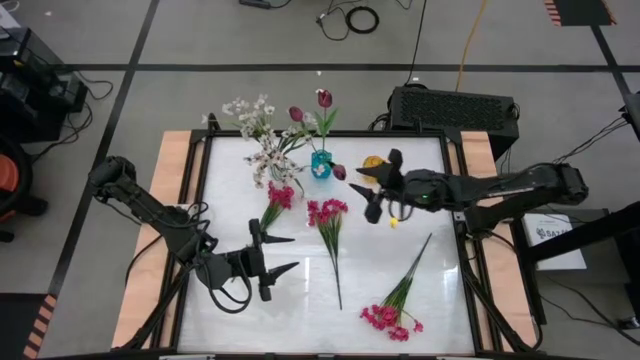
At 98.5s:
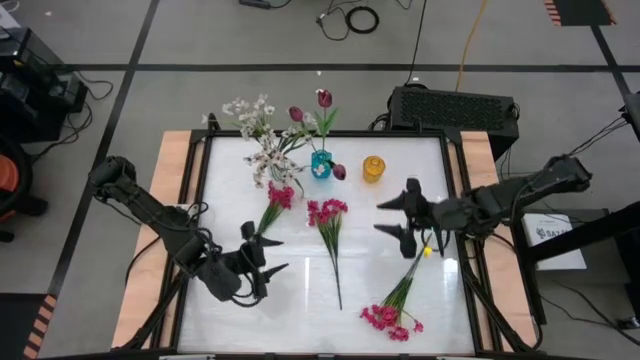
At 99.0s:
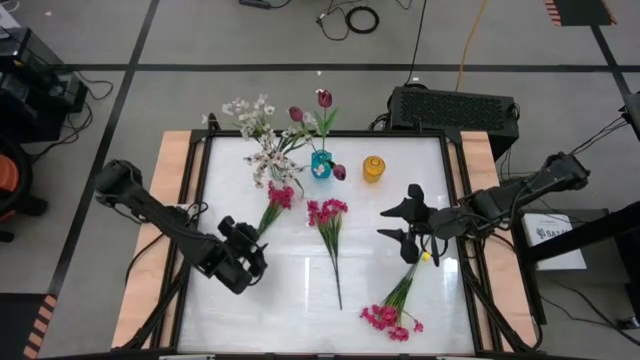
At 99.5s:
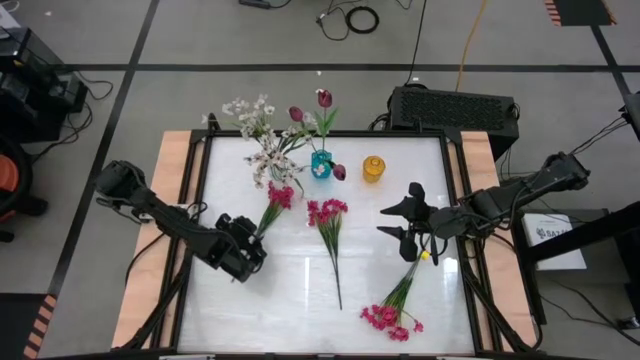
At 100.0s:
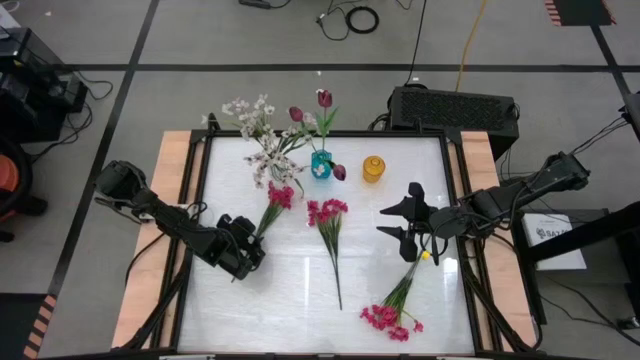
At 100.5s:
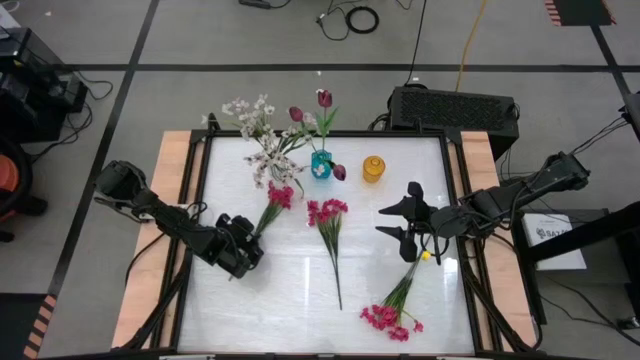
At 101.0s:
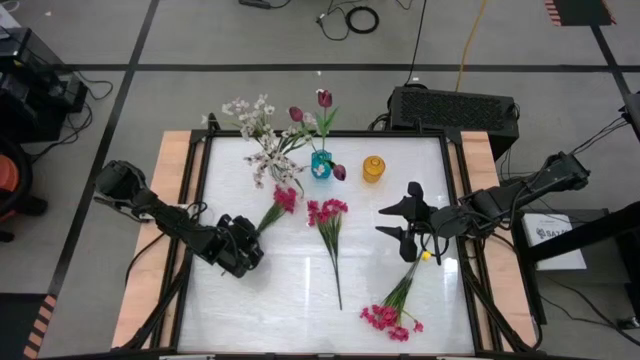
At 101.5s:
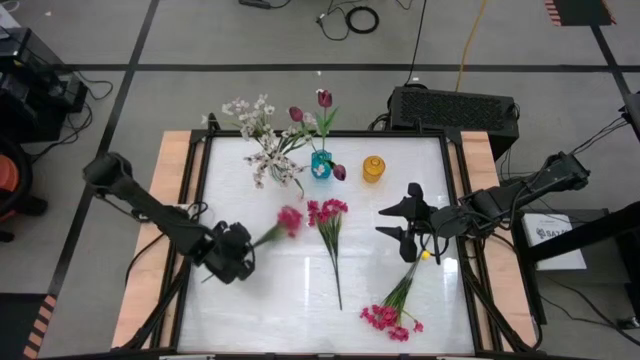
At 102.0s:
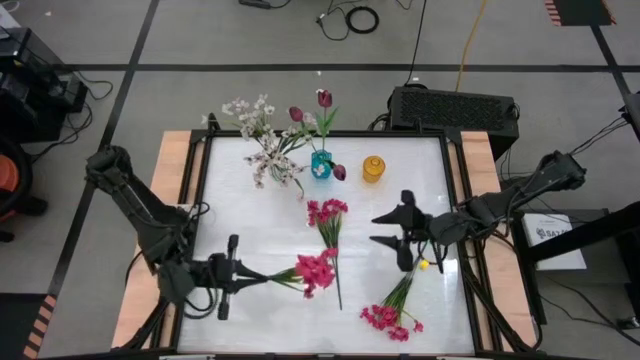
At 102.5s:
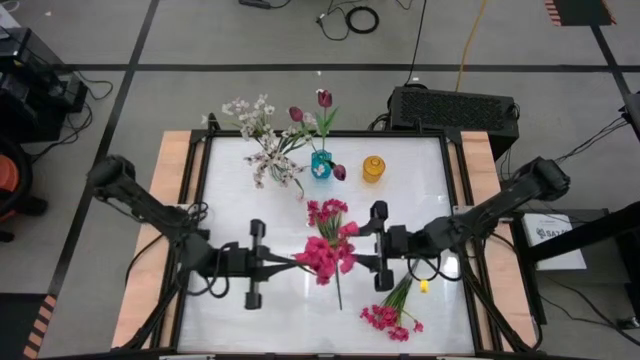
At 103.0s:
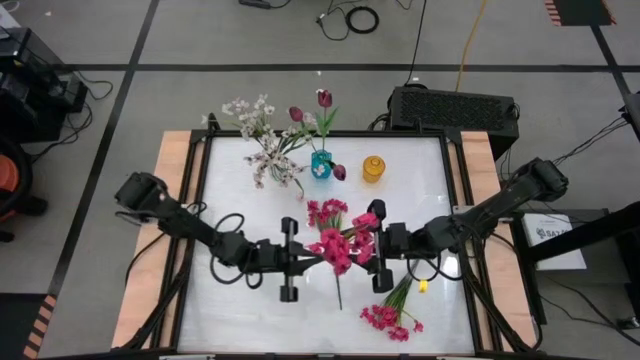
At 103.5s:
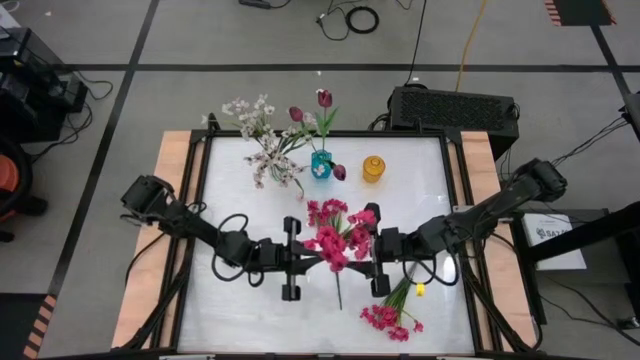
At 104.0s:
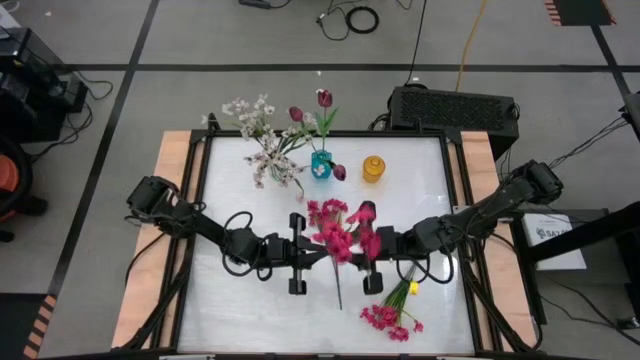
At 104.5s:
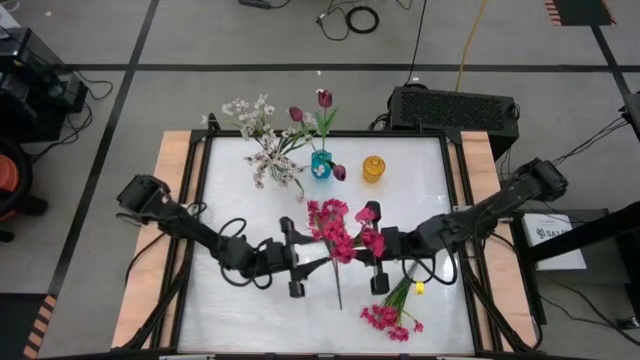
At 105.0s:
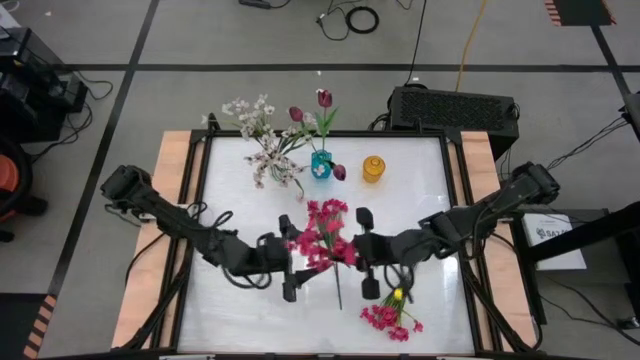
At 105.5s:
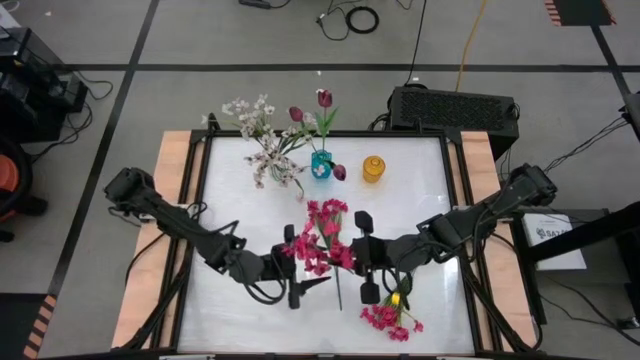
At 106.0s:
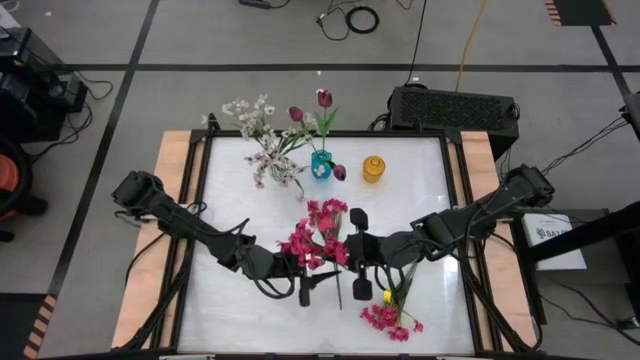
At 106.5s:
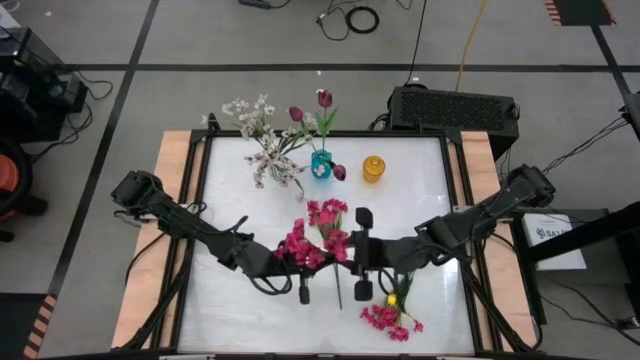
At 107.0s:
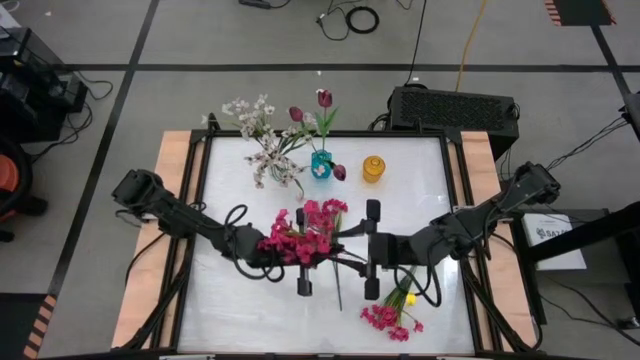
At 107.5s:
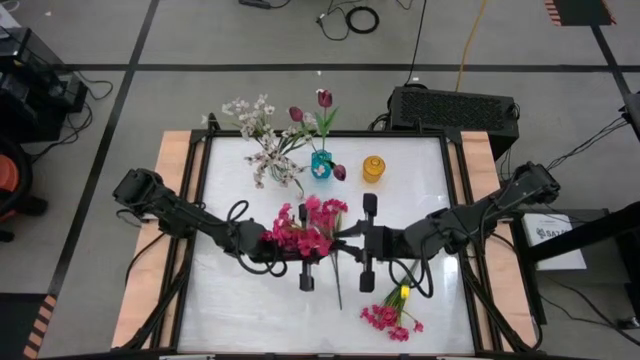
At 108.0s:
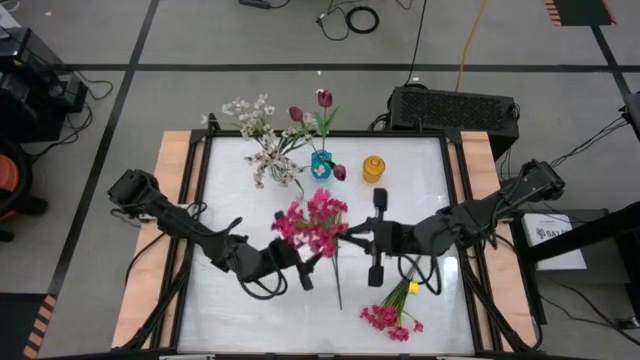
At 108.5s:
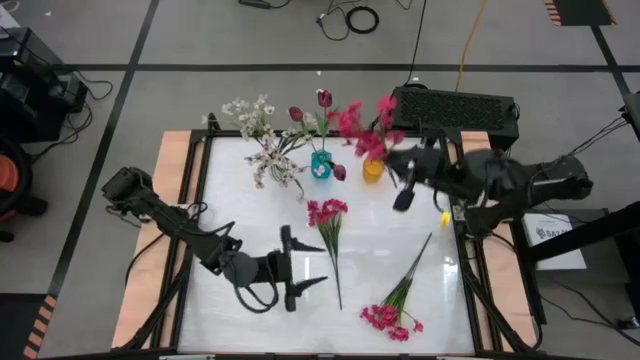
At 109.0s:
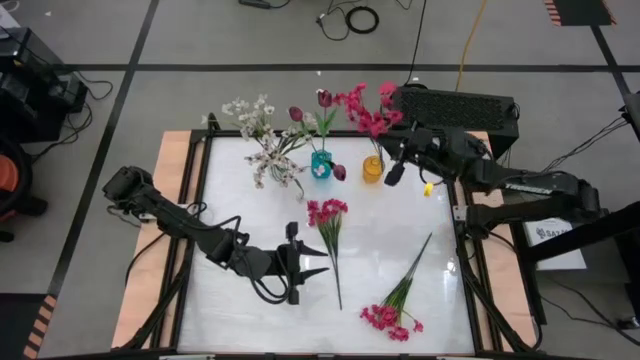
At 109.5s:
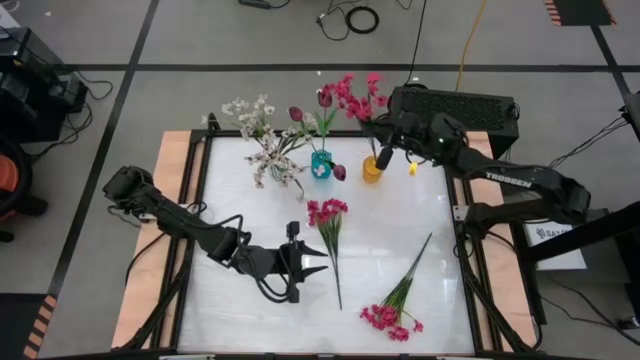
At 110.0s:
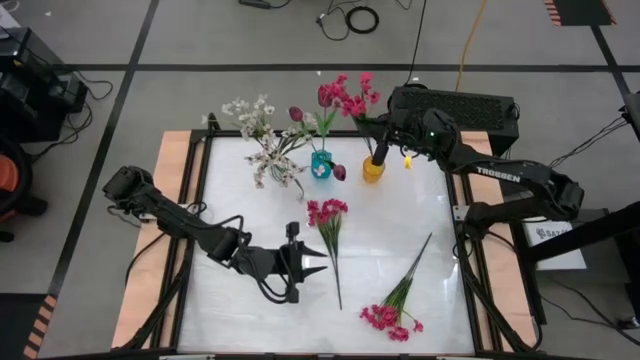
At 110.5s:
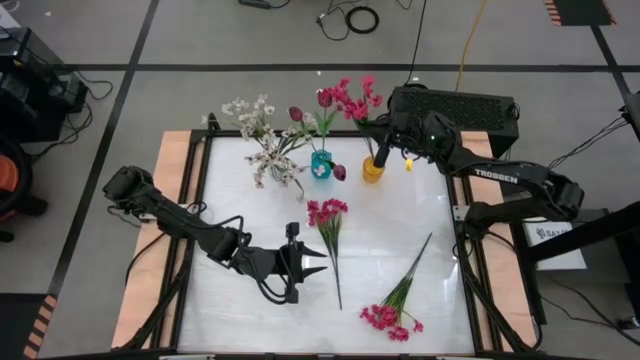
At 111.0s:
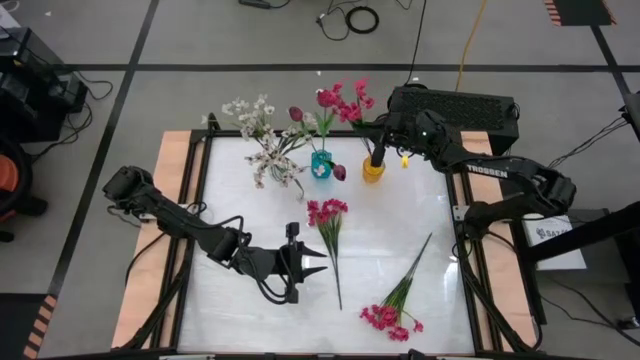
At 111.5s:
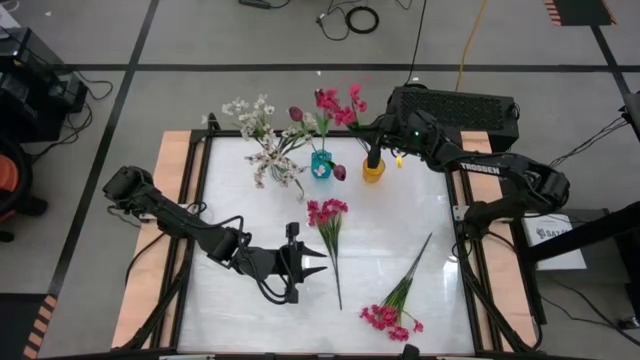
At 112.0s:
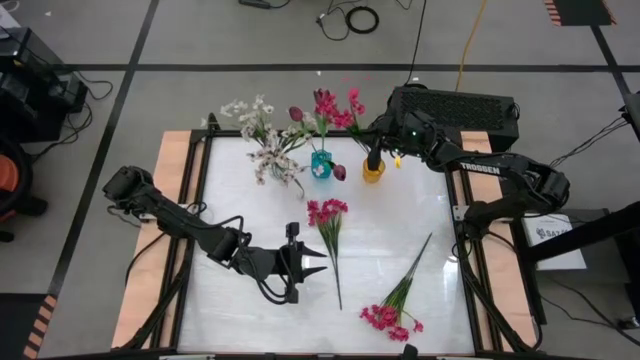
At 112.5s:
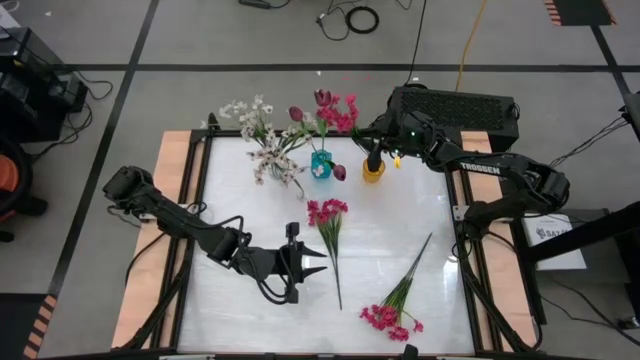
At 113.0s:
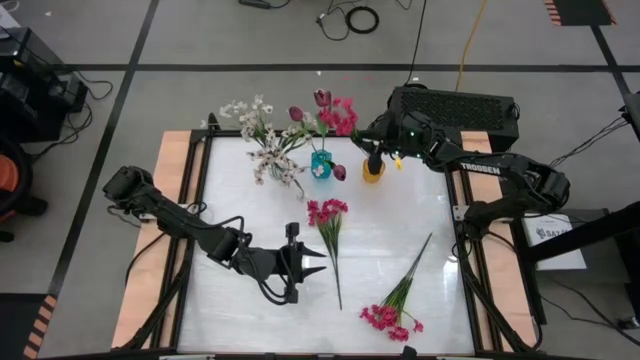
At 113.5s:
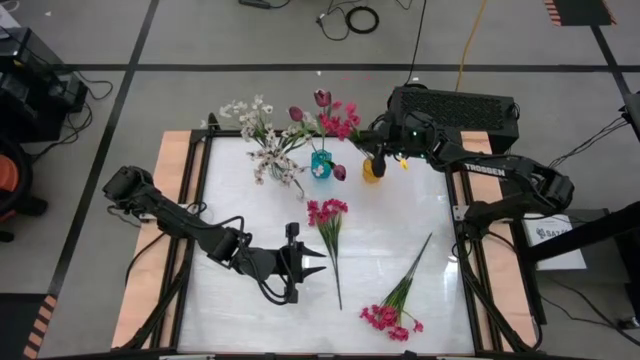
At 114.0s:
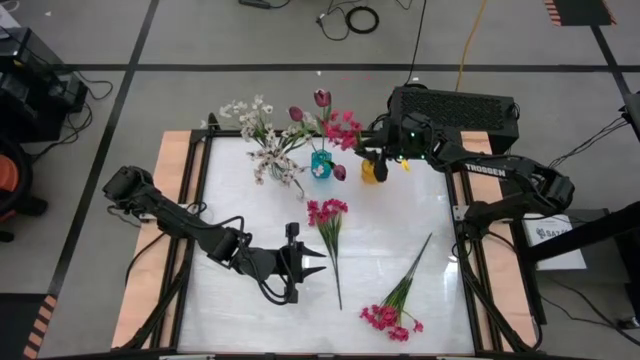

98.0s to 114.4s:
Task: Sort flowers into vase by color
Put the left pink flower into the yellow vase

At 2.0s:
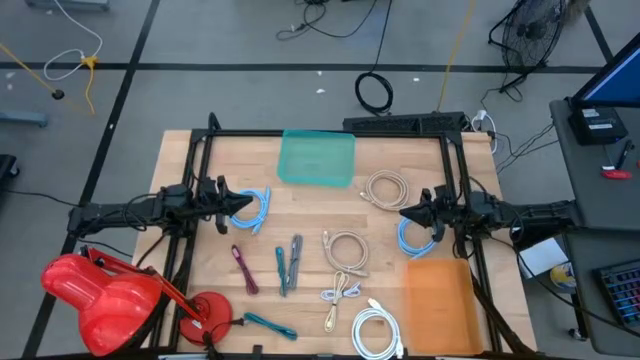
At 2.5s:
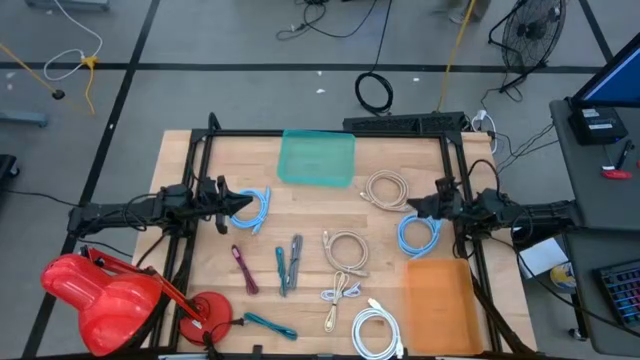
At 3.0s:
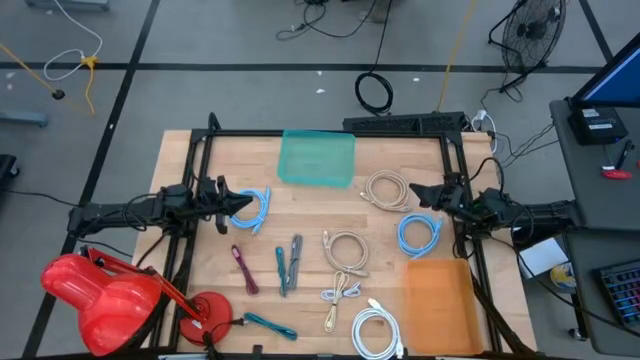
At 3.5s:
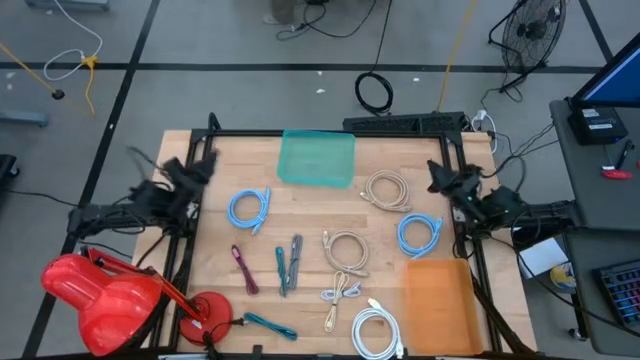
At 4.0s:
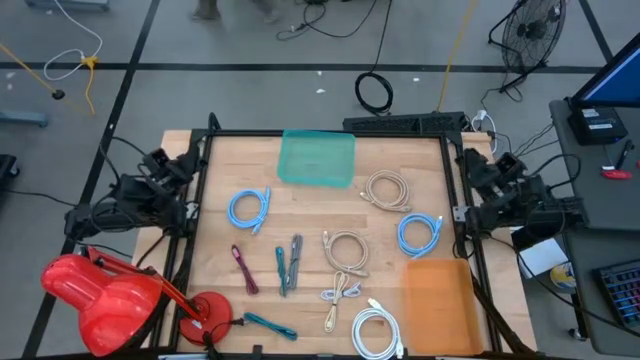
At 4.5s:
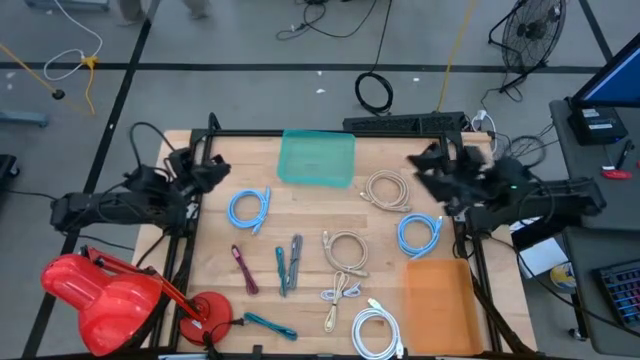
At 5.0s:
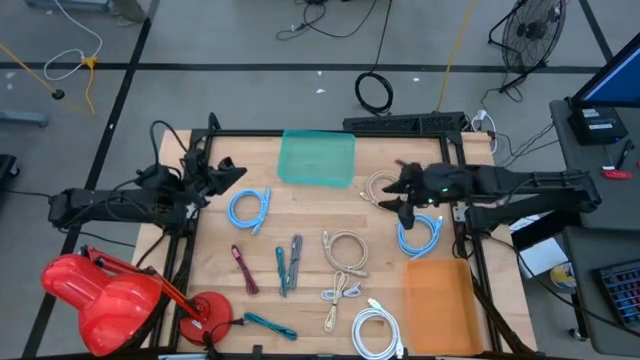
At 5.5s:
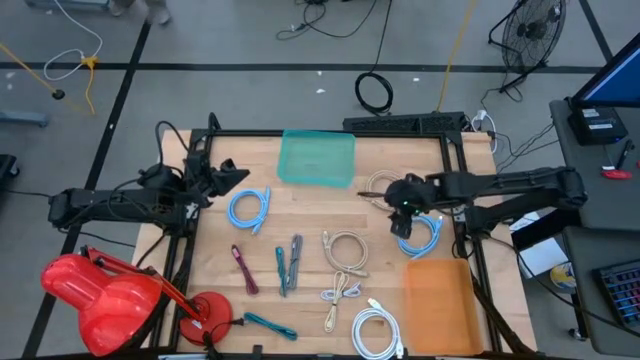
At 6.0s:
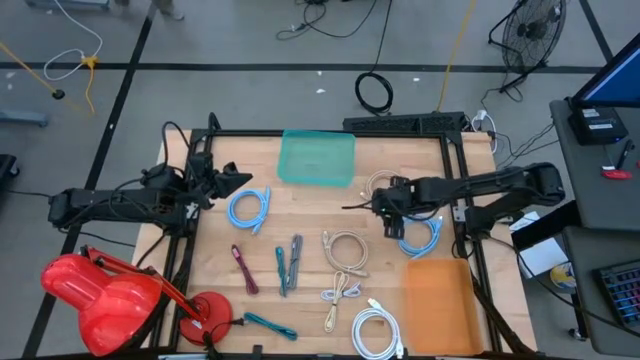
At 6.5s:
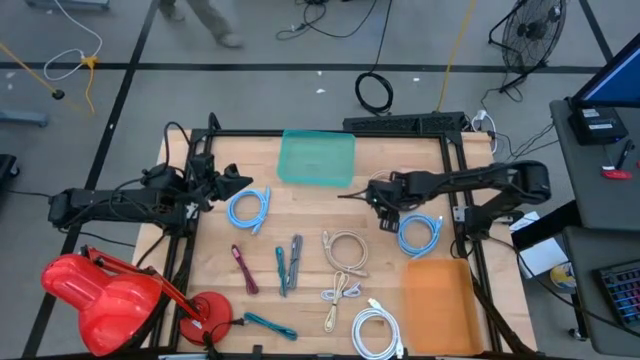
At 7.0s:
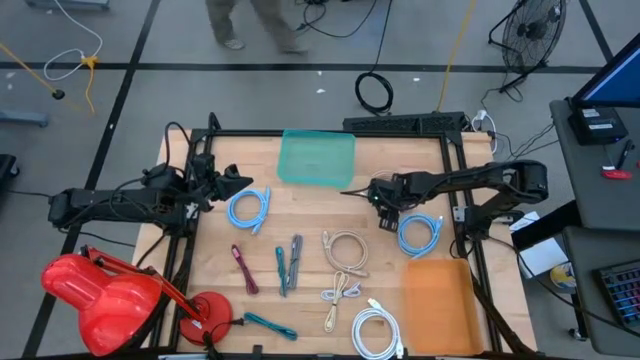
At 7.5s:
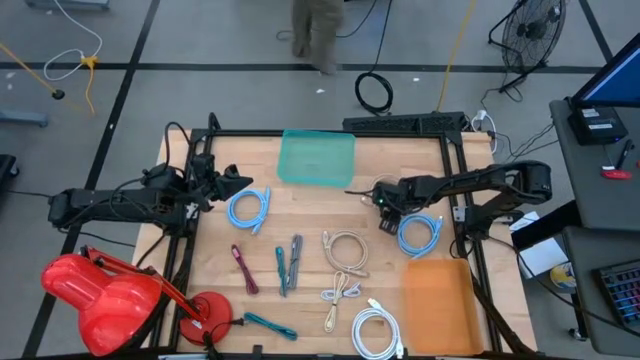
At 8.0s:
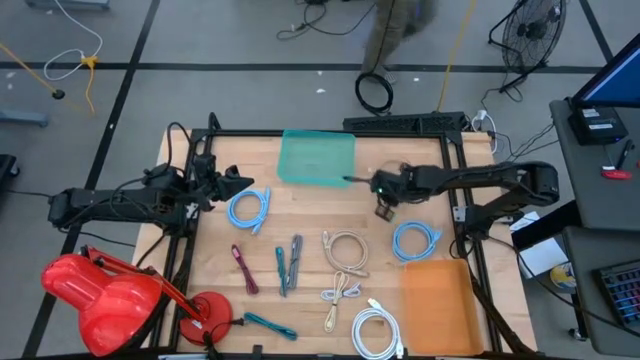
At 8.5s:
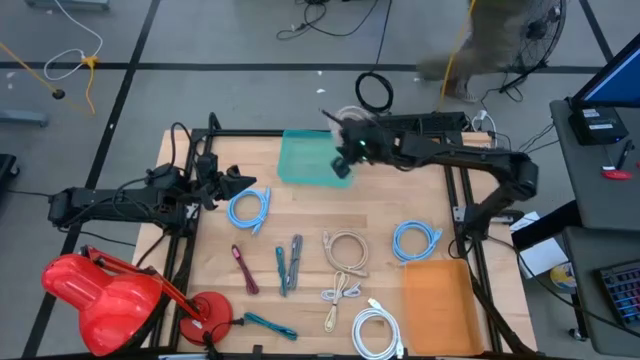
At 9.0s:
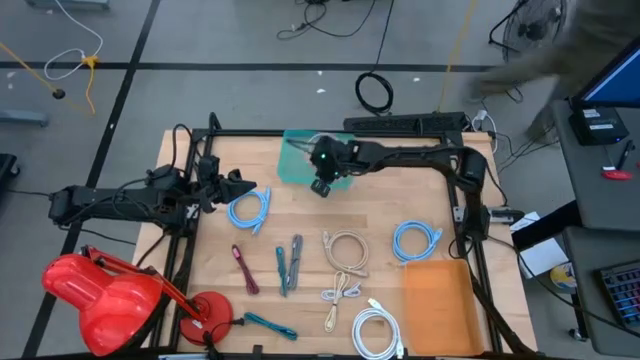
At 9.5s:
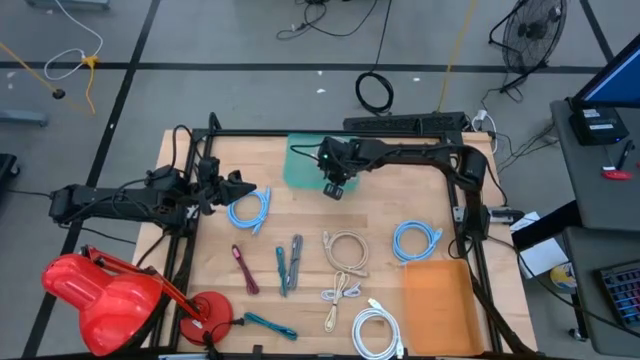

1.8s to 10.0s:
Task: Pick & Place USB Port
Put the top brown display cable into the blue bin
